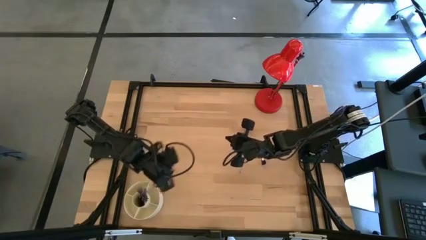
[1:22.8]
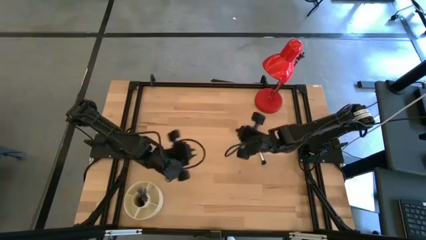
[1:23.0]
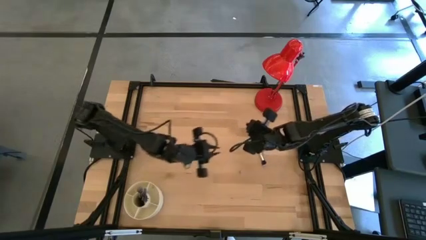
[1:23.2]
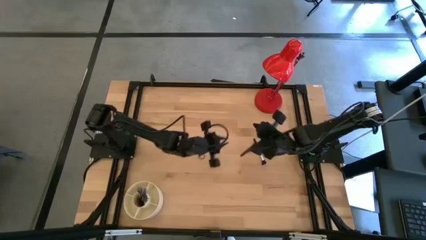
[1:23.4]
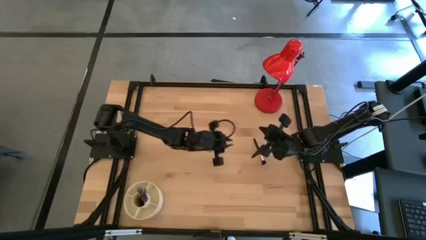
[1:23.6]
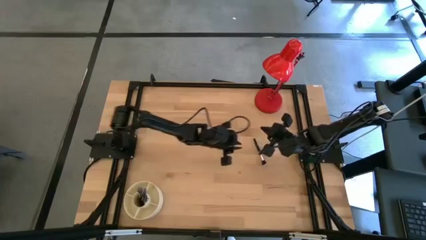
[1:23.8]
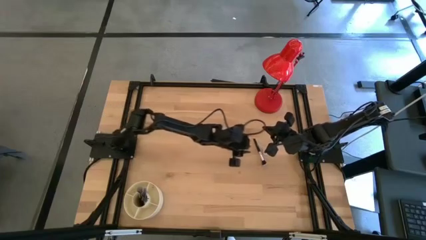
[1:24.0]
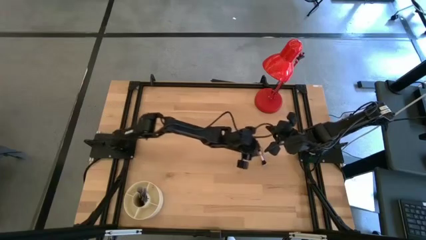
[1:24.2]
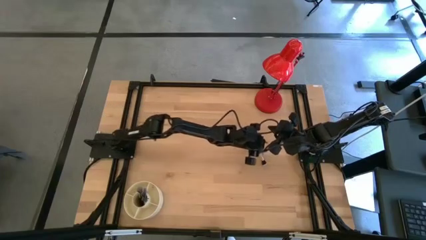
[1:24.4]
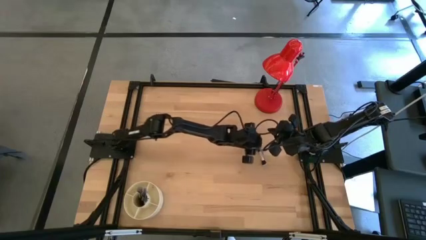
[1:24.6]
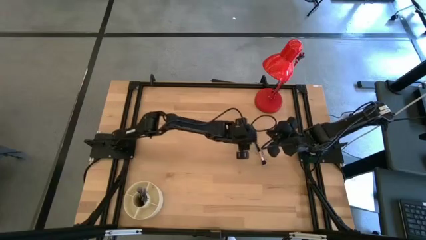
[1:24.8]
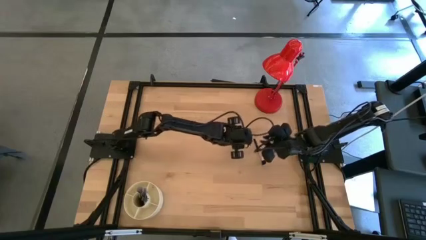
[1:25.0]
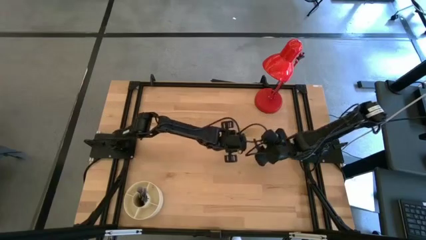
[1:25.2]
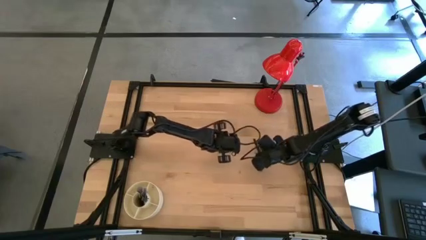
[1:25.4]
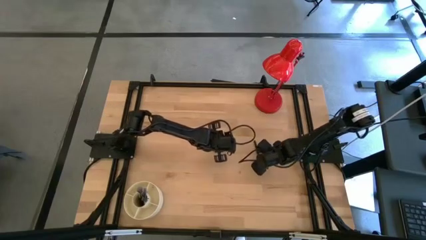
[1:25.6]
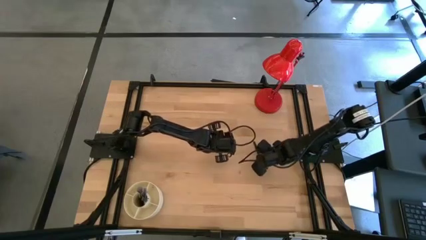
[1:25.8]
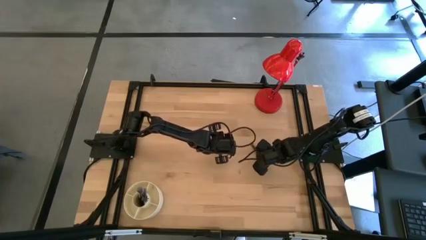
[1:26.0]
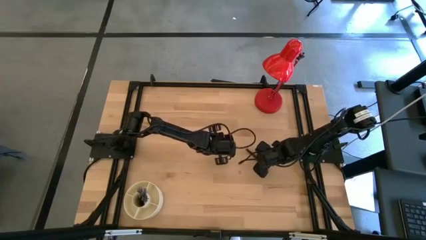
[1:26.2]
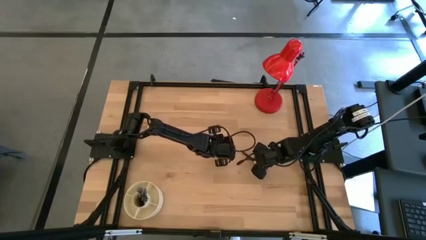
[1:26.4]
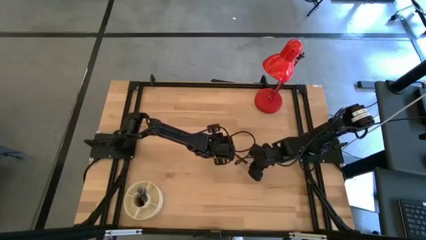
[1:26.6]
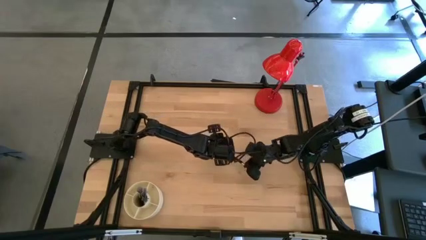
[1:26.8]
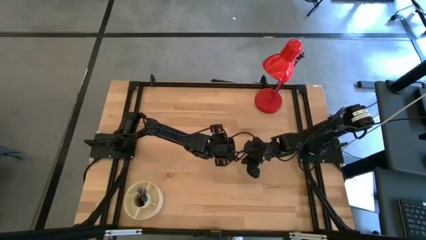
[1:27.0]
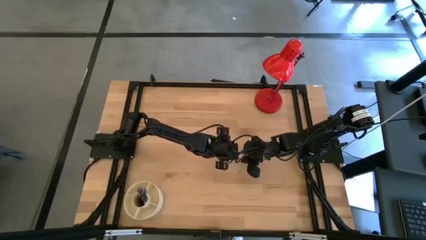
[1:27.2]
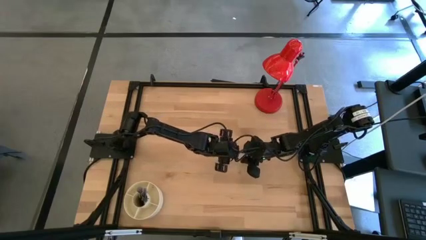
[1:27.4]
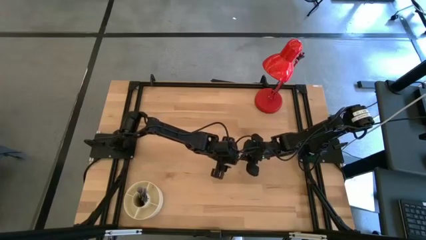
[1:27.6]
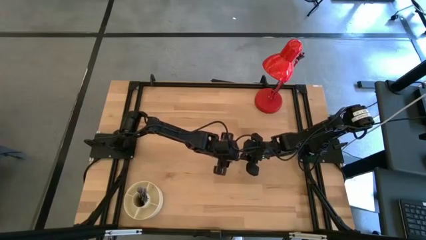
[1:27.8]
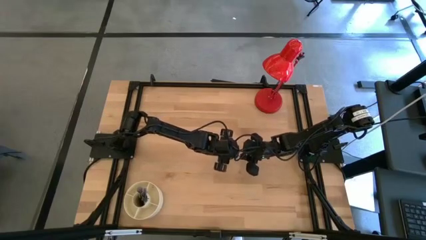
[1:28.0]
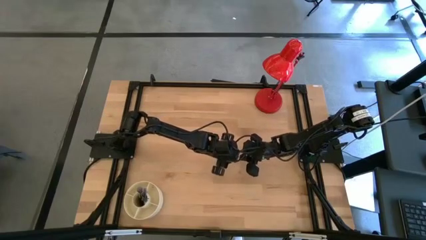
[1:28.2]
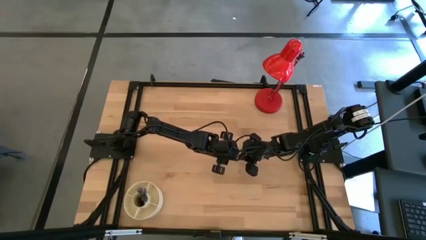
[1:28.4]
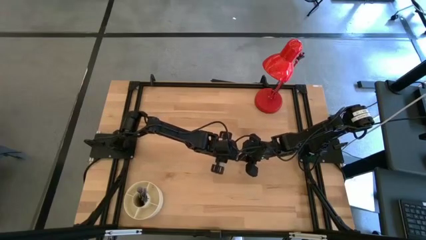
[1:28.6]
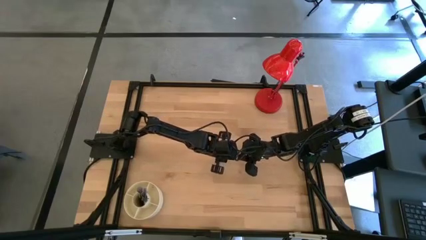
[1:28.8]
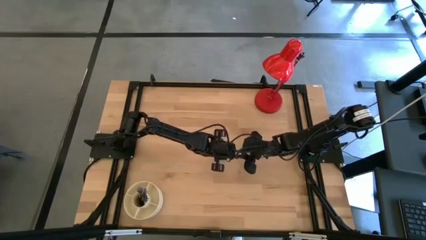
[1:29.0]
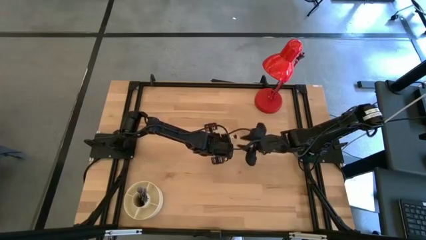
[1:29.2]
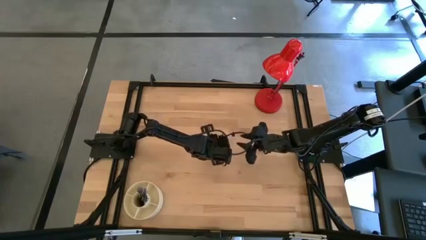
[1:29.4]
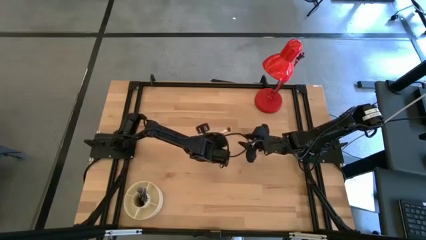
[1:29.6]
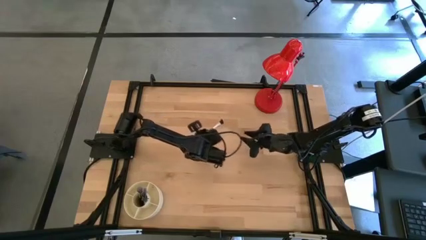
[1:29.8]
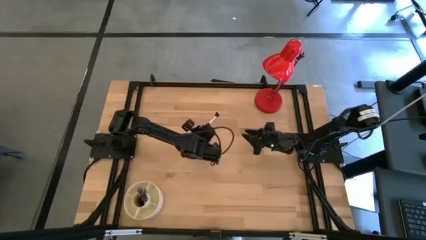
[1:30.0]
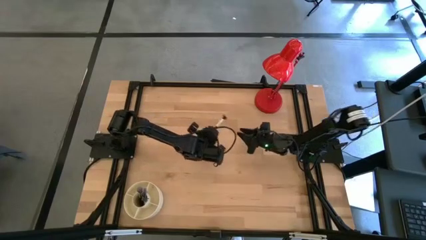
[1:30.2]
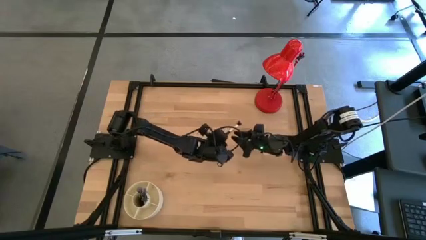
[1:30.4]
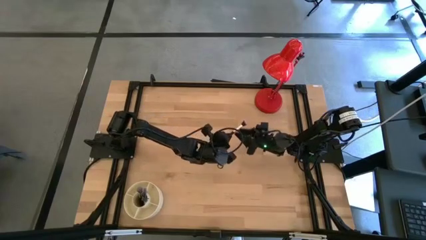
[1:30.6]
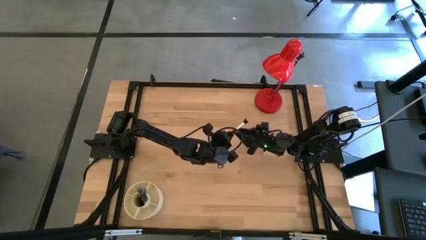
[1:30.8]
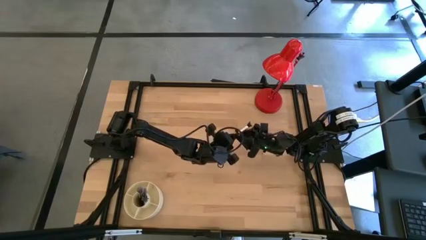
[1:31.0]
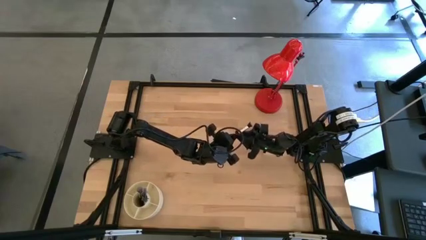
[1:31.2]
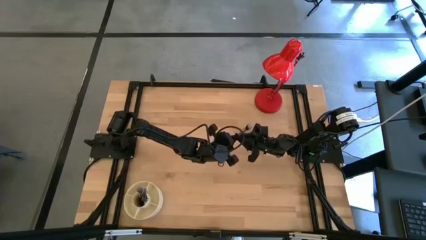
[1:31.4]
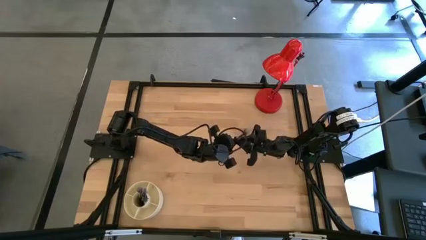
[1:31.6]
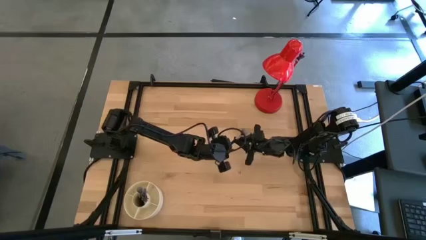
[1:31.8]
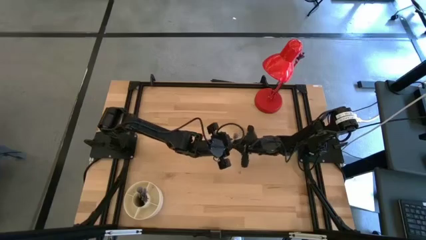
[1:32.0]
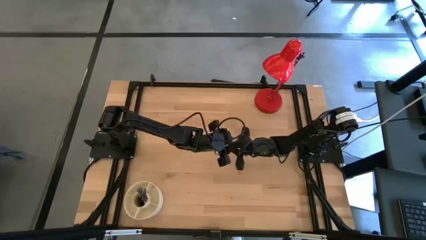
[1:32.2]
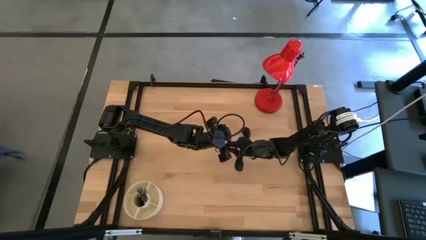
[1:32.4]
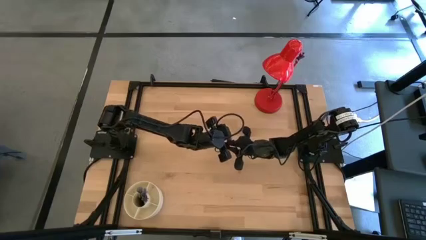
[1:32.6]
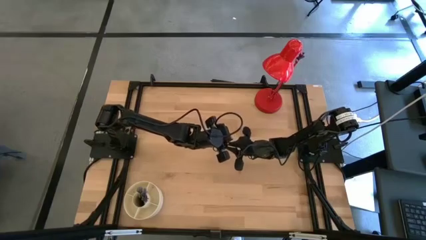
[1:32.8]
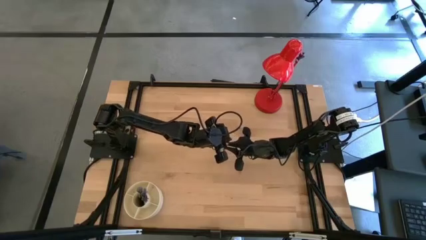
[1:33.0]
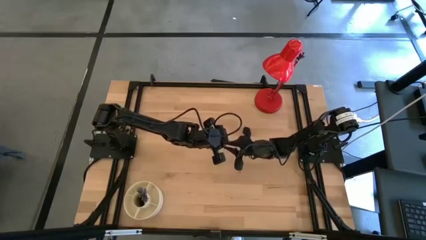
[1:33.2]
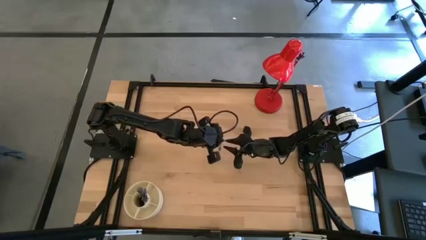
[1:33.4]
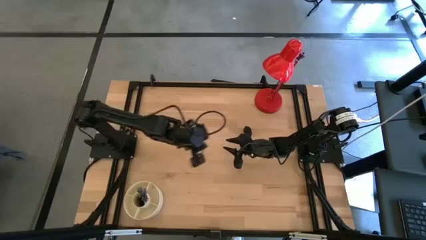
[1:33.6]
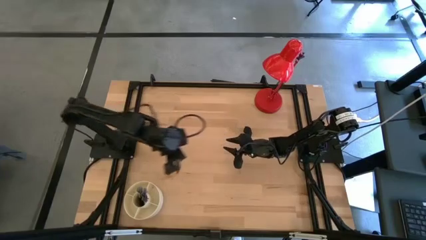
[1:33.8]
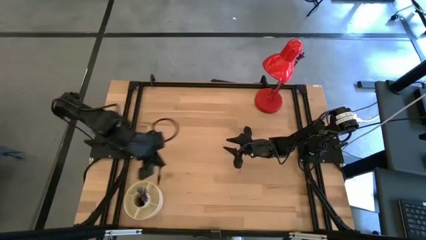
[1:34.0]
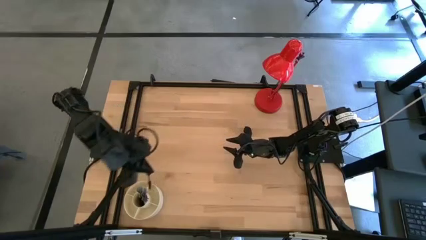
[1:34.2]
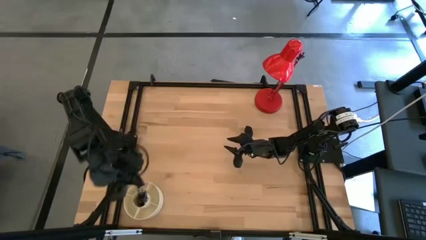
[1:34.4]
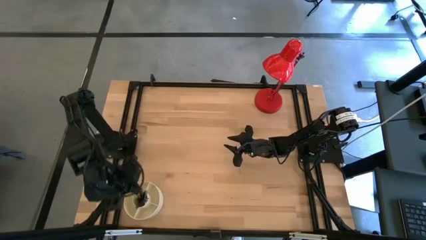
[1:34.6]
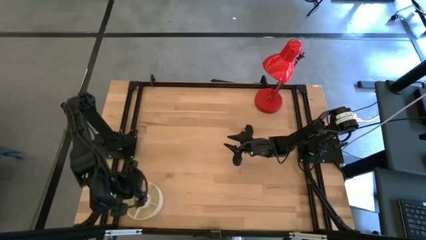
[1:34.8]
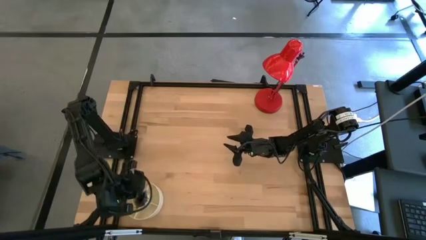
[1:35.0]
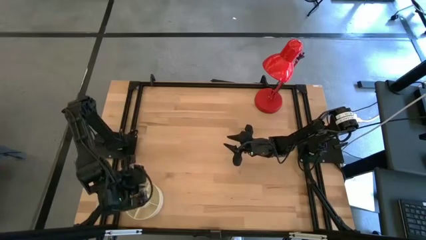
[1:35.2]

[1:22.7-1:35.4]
Task: Pick & Place Makeup Brushes
Put the black powder brush into the makeup organizer

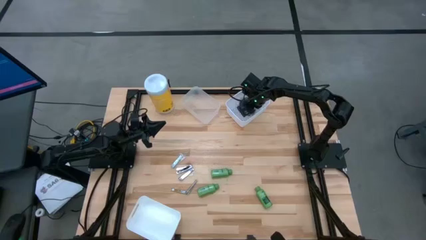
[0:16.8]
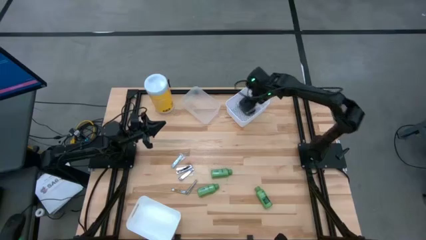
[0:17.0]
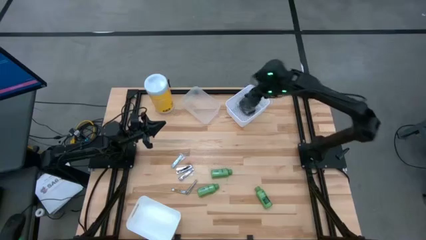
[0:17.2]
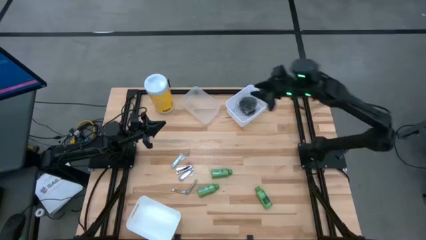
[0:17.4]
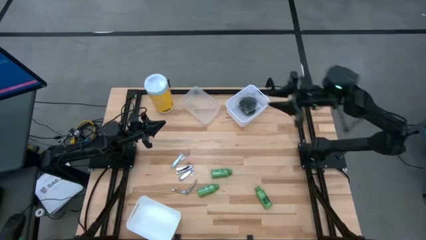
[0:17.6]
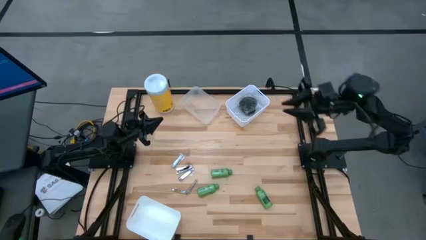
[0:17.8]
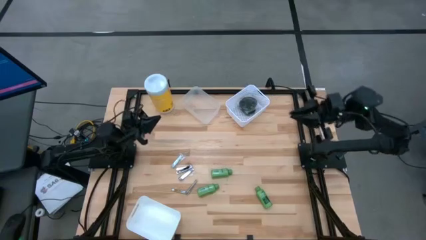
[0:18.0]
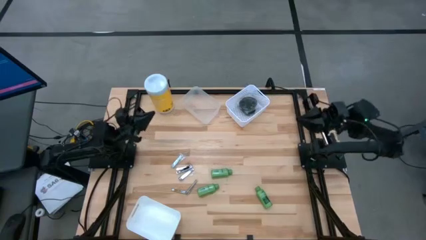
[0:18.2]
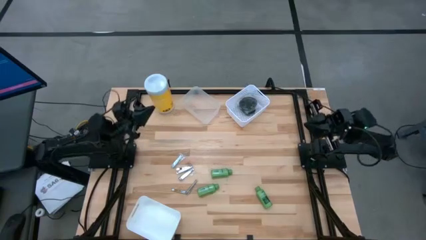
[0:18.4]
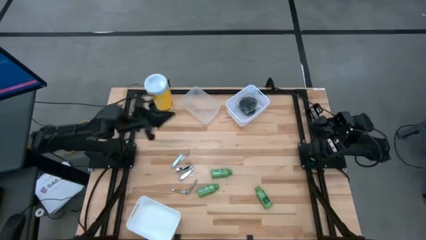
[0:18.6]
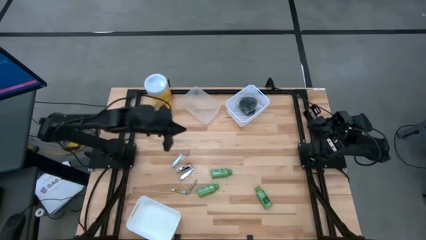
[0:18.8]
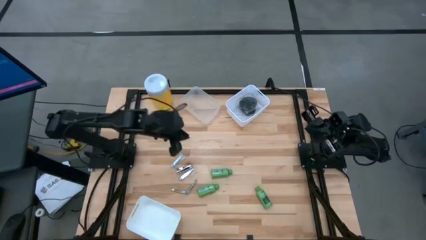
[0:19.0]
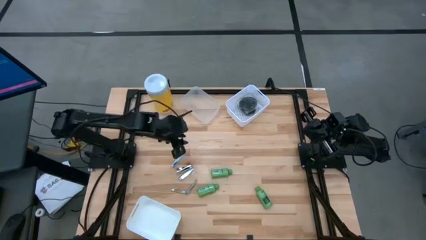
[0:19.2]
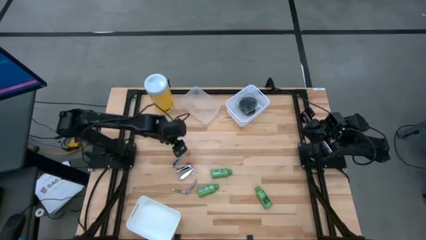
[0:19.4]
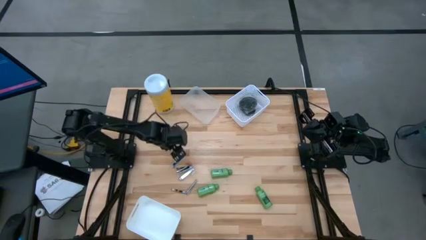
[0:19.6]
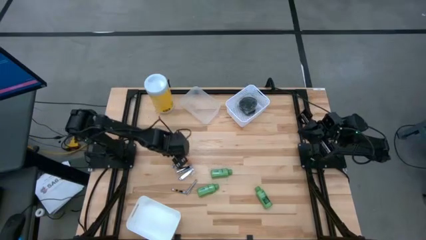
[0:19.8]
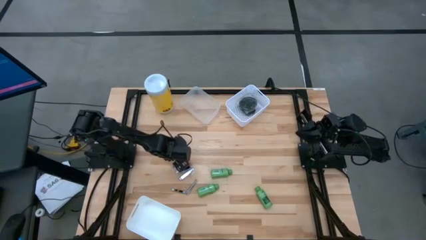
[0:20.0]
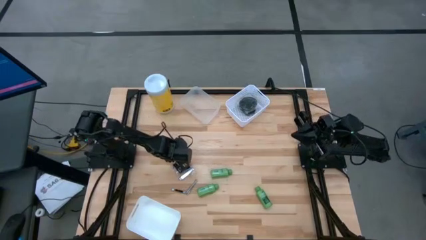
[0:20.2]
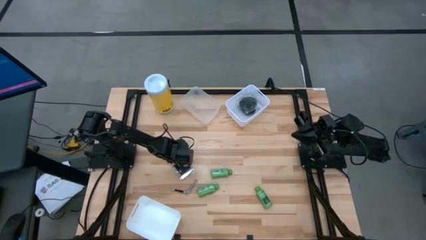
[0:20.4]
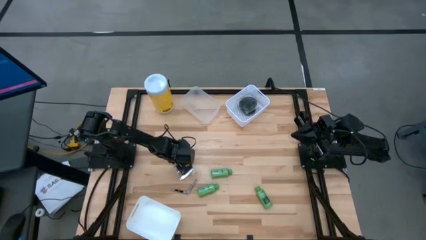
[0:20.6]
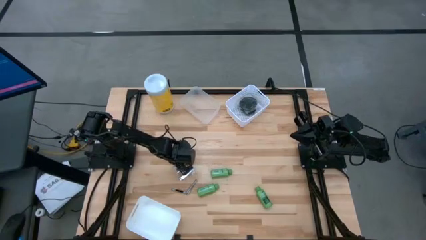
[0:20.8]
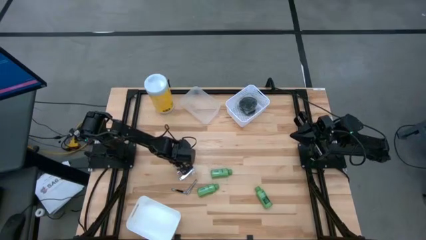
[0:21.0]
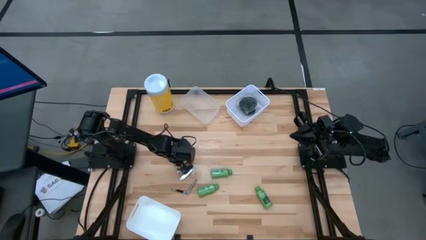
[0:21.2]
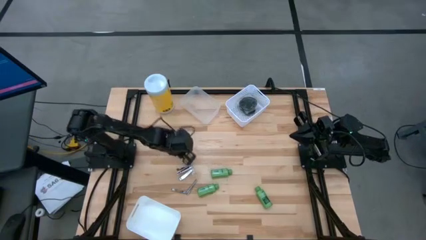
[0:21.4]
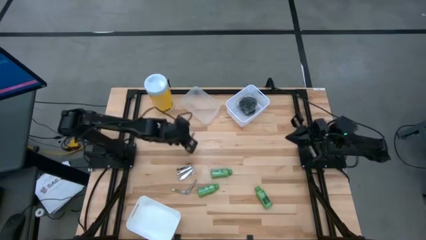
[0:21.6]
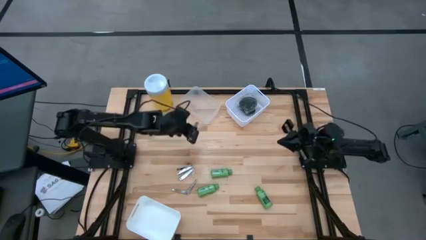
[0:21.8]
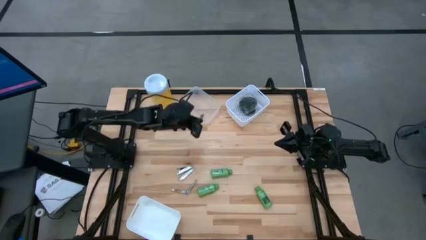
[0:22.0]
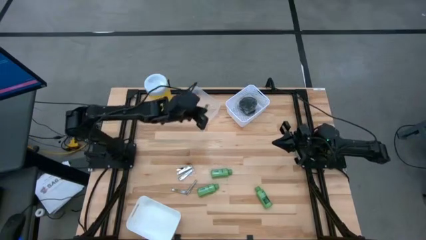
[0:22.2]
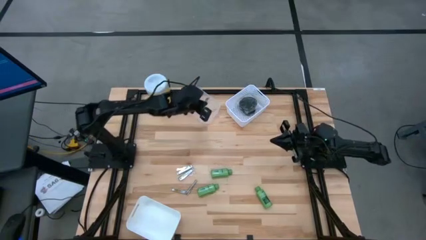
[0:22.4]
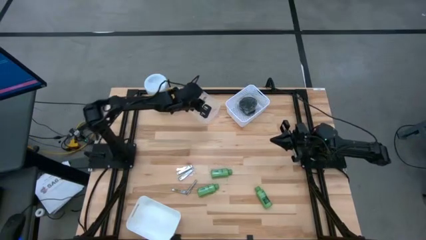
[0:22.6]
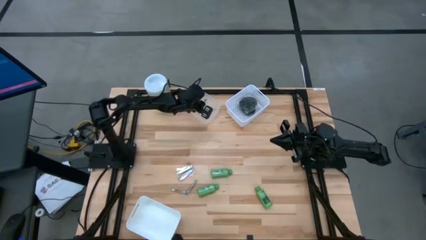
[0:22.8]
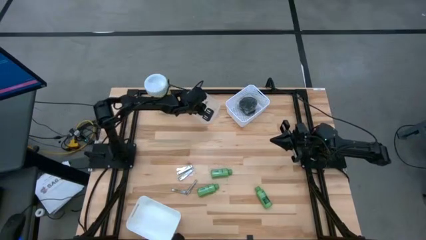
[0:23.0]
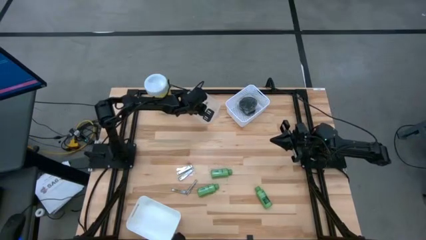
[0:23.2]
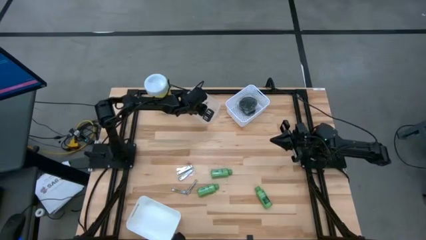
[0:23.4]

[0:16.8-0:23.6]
Task: Pick & Place Travel size toiletries
Put the silver nail cutter into the transparent bin
